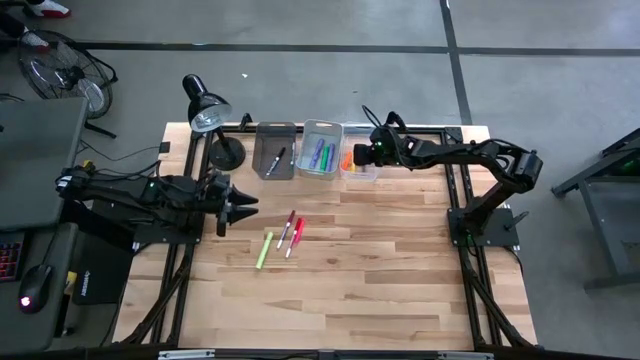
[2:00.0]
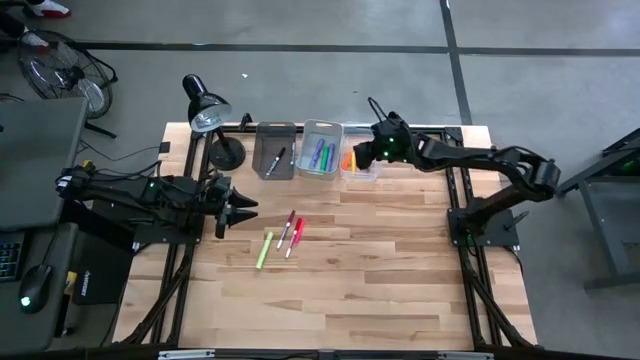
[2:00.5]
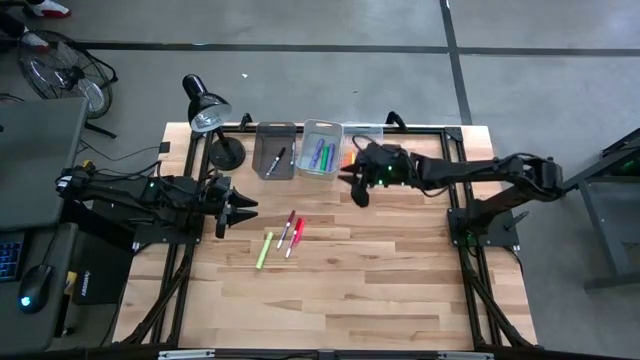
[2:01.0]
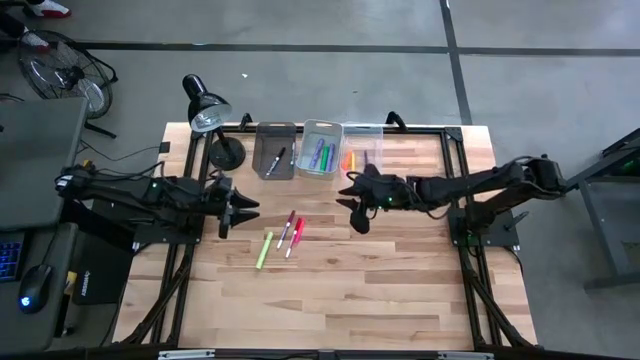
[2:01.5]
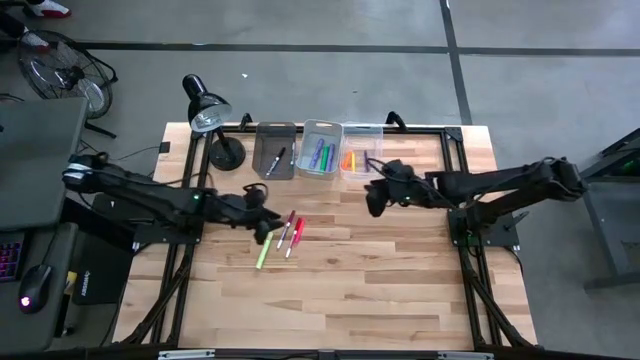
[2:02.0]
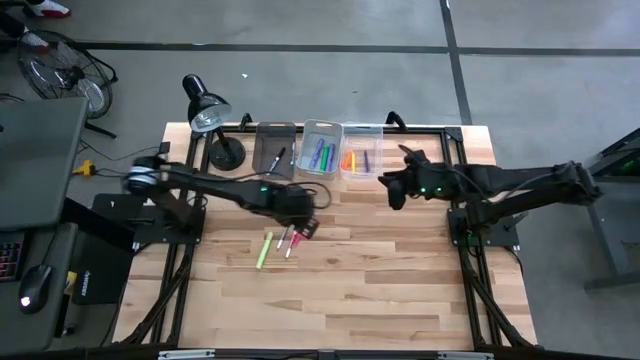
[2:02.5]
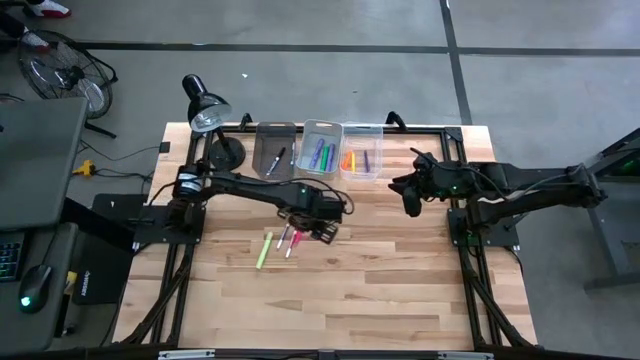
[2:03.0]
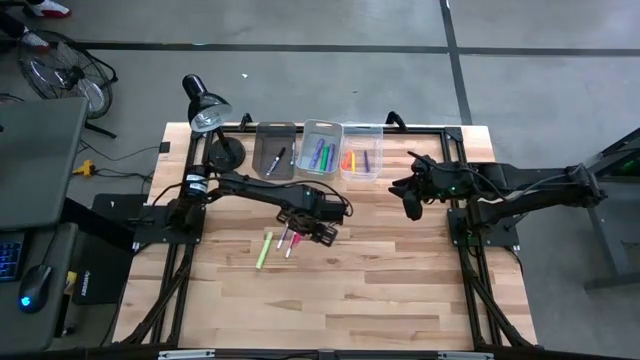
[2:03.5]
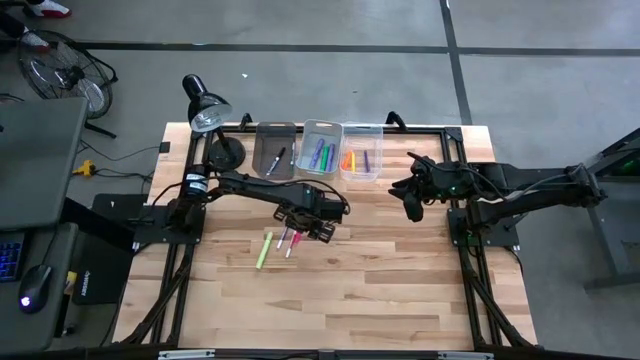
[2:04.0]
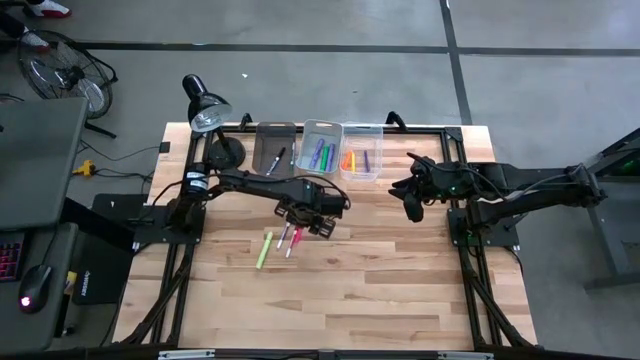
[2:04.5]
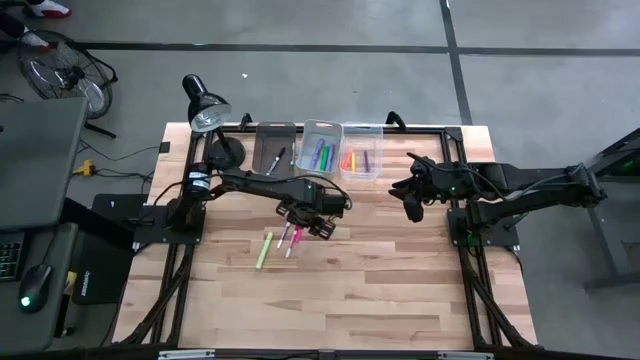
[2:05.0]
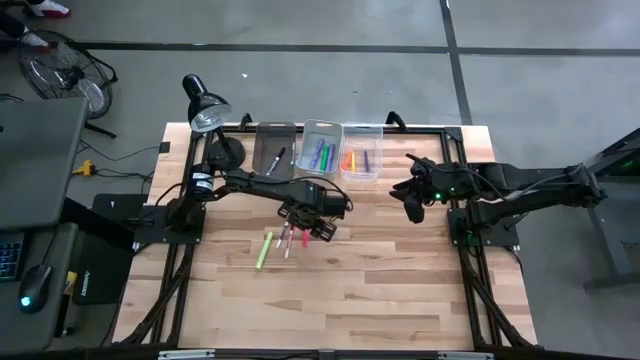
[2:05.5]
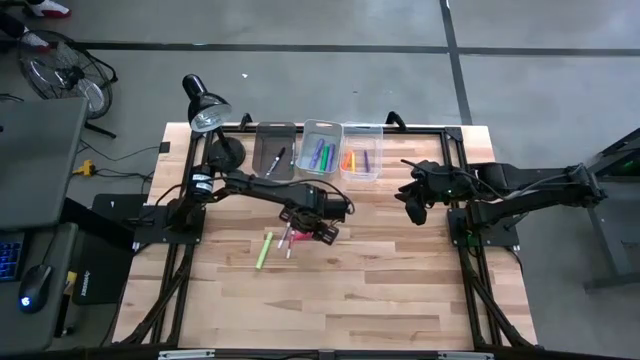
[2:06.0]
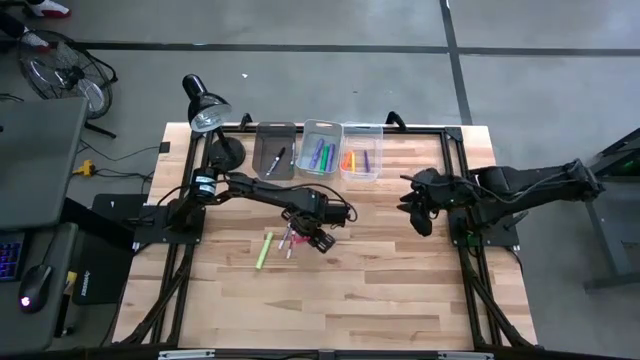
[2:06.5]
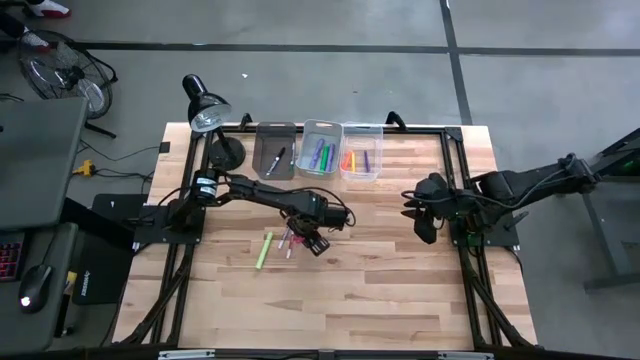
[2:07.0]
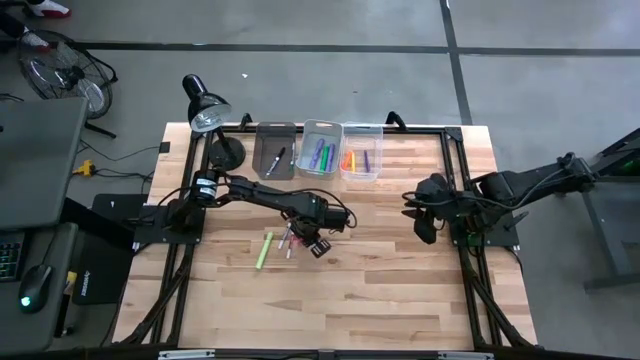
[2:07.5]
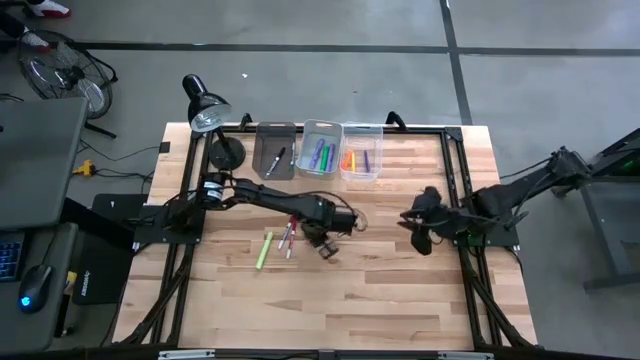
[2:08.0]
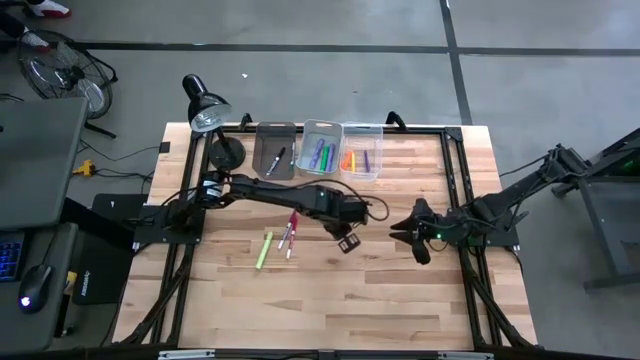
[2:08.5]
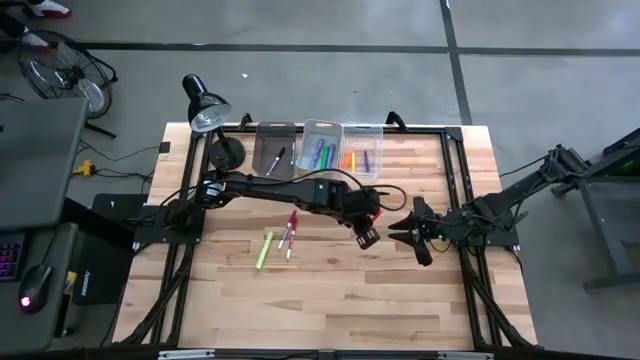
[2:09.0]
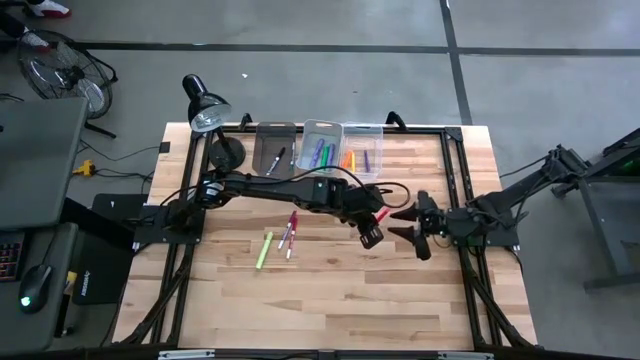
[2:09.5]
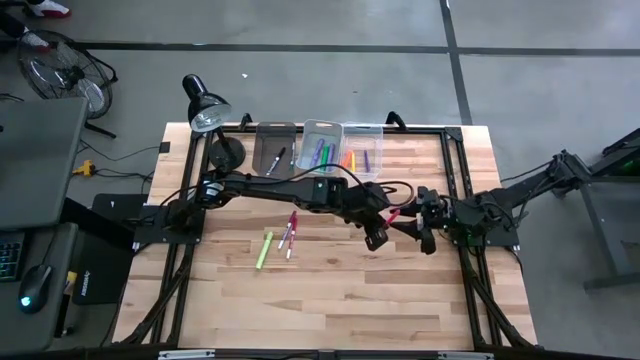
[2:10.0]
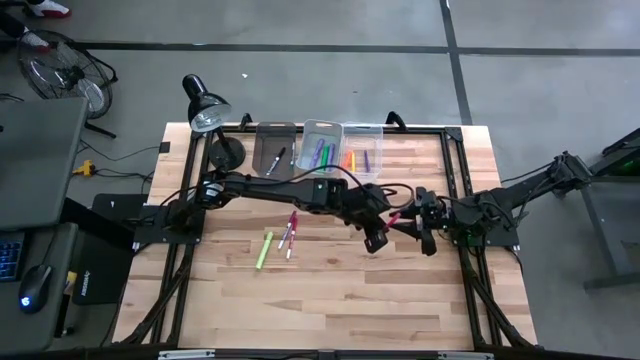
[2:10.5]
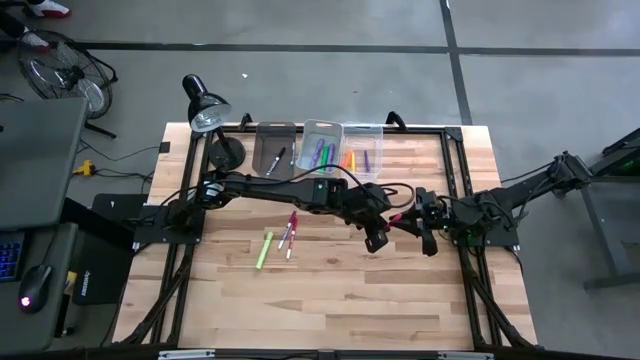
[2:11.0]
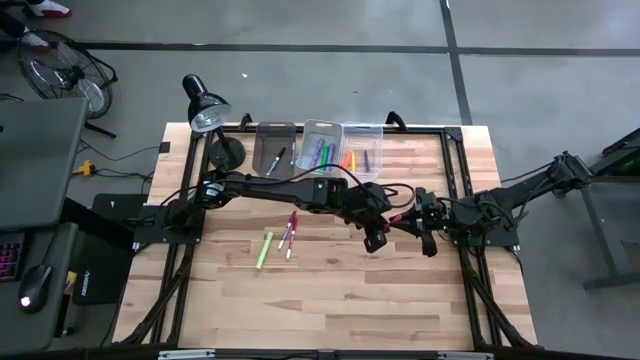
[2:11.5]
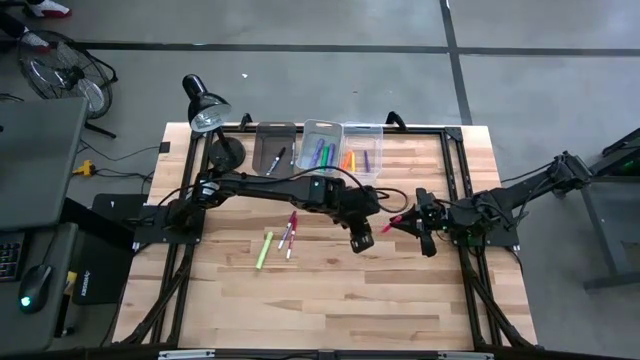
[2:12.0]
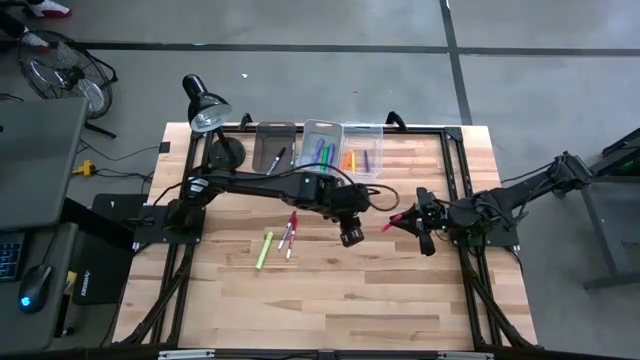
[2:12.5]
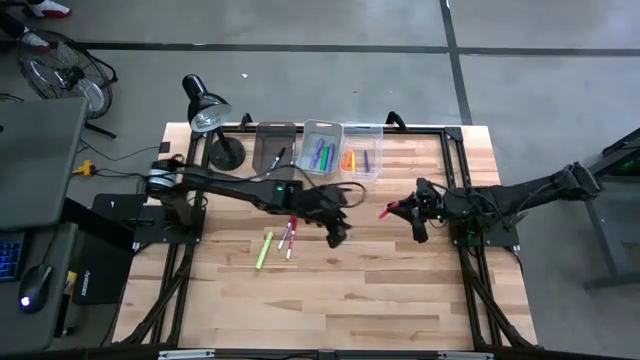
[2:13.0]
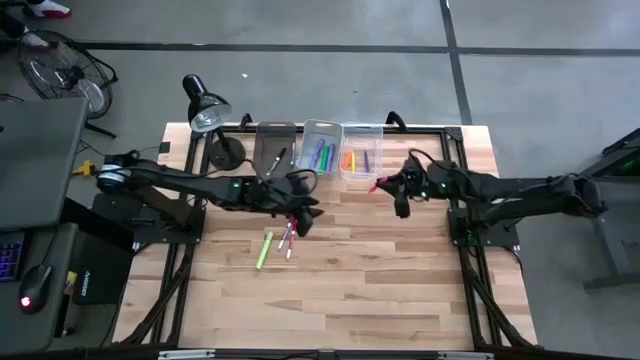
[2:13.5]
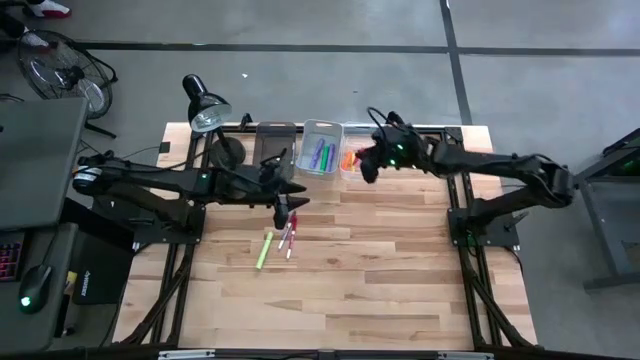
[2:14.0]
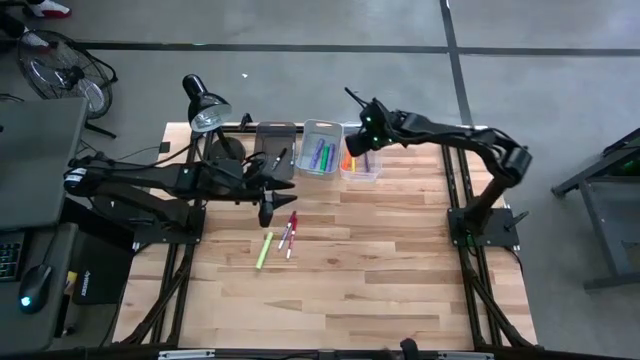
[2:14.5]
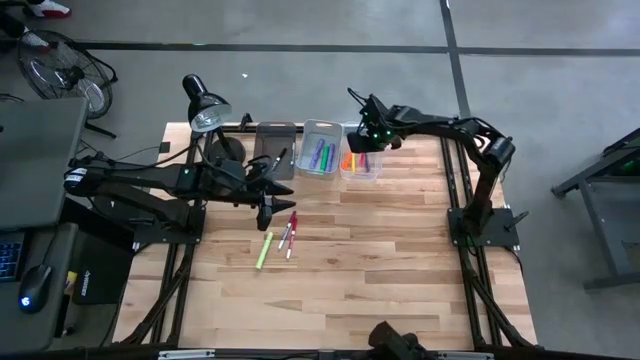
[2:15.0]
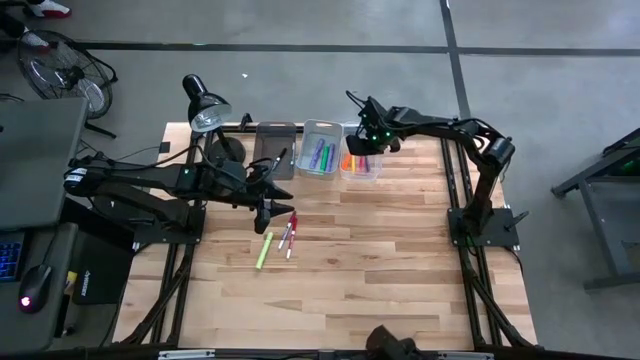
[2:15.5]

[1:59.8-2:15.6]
Task: Pick & Place Markers
Put the pink pen into the transparent bin

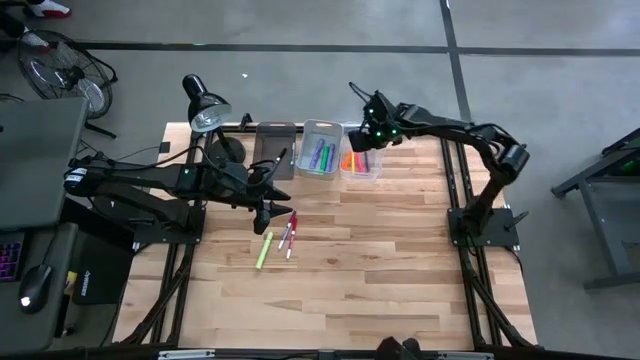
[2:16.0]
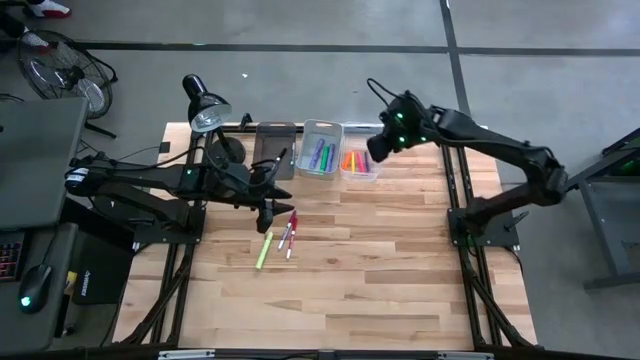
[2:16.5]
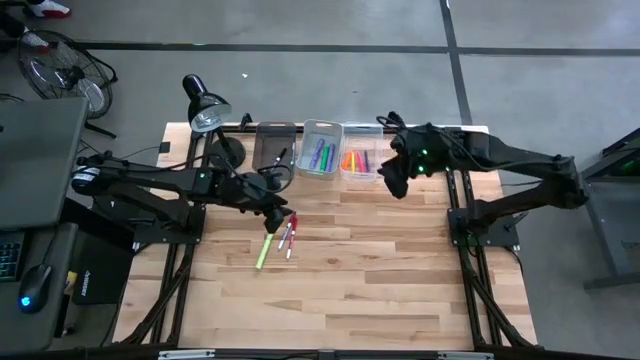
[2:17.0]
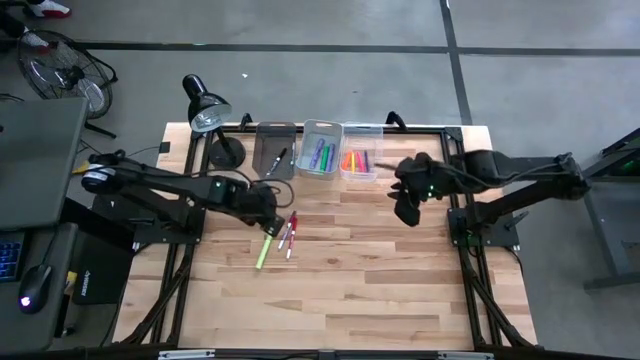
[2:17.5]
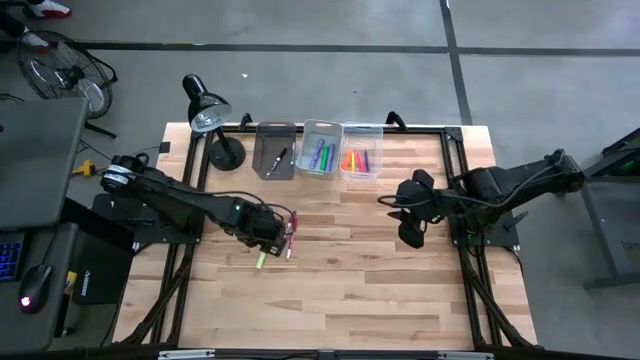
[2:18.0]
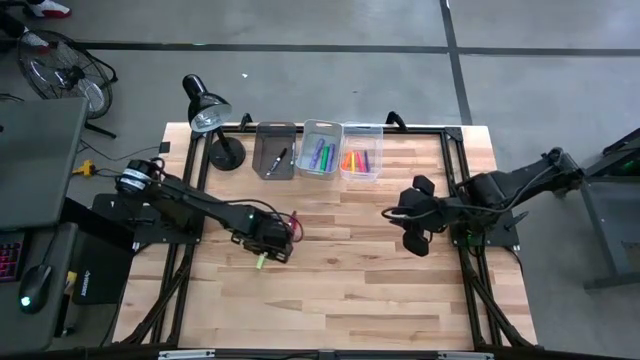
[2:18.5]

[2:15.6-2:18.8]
Put the light green highlighter into the white bin

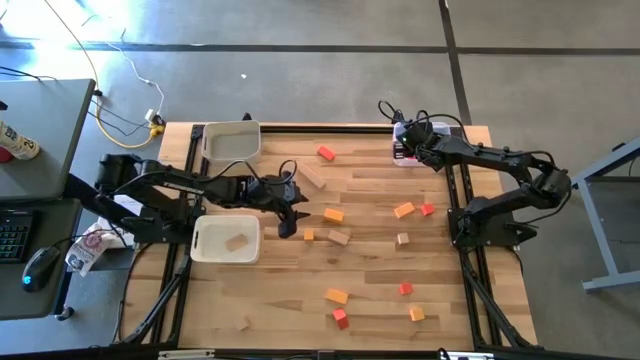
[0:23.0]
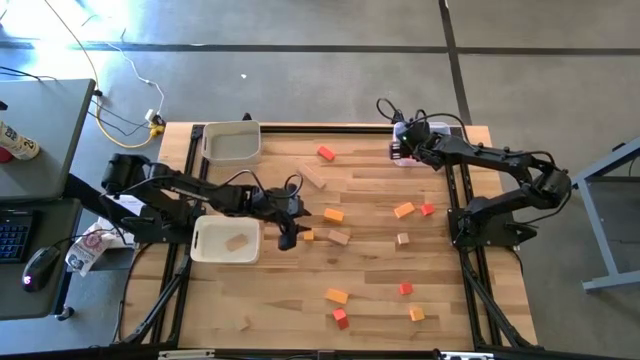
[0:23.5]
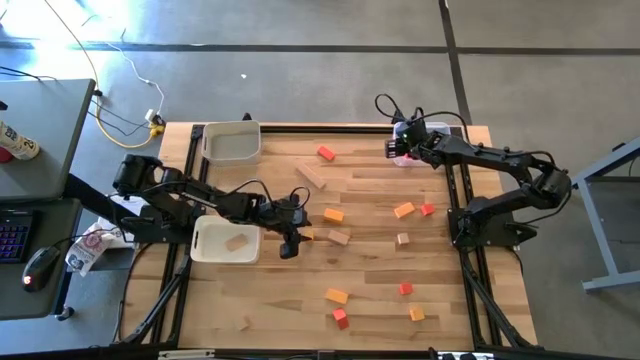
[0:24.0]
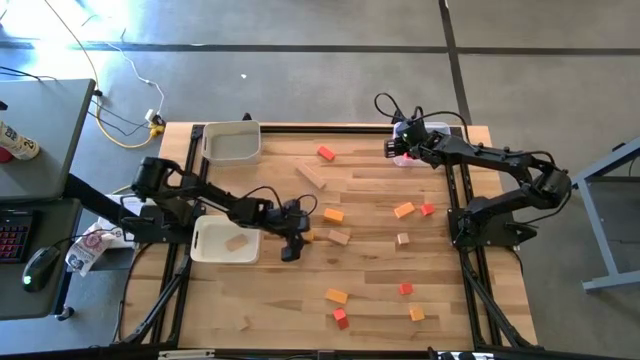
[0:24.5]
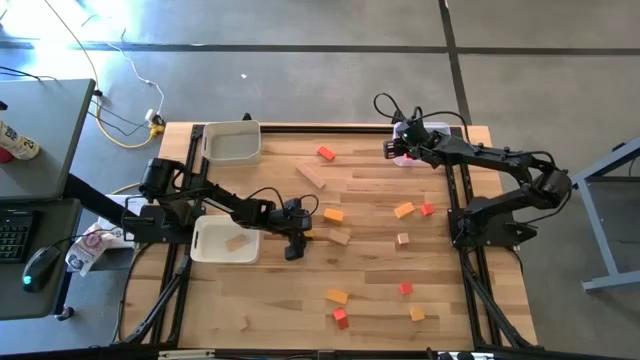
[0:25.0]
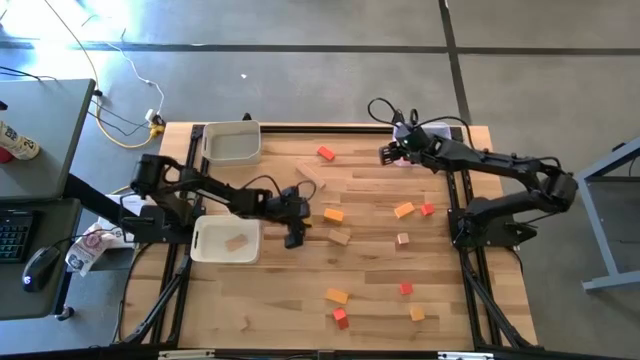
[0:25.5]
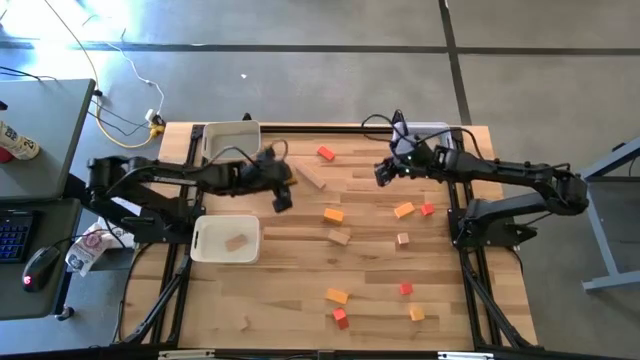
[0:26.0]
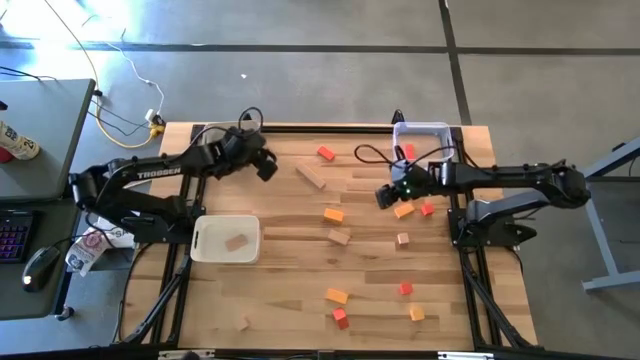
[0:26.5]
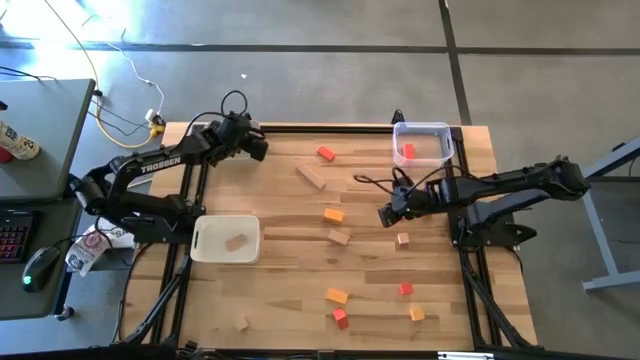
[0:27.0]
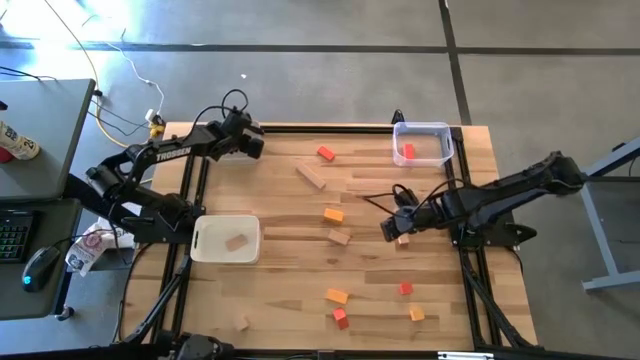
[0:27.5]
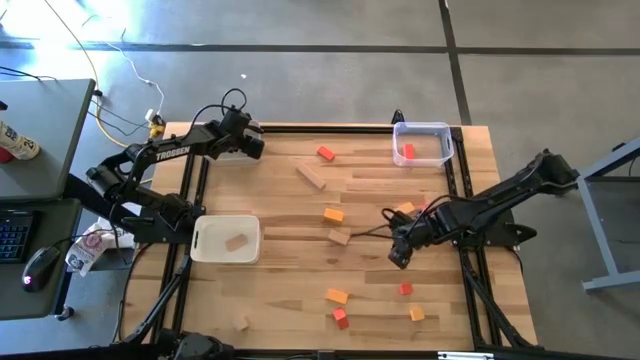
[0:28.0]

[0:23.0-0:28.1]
Task: Sort & place blocks by color
Put the yellow block into the gray bin
